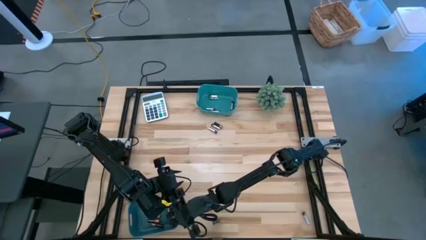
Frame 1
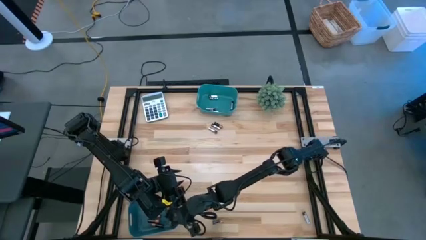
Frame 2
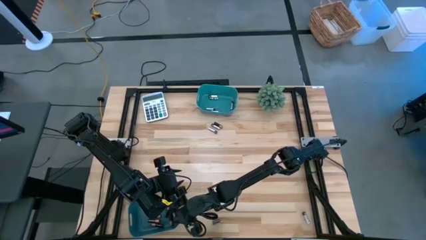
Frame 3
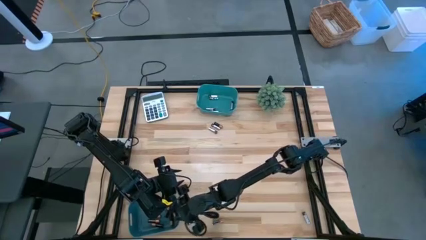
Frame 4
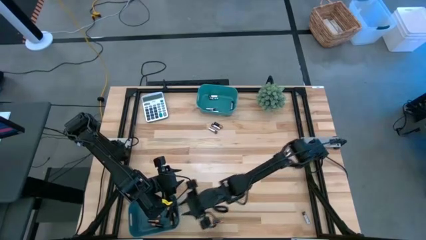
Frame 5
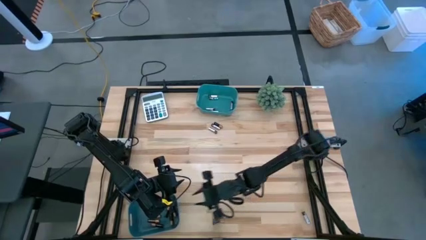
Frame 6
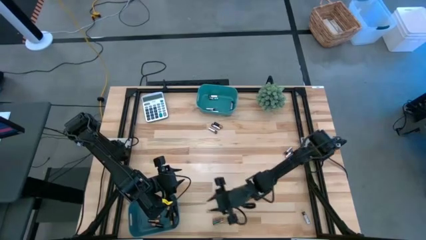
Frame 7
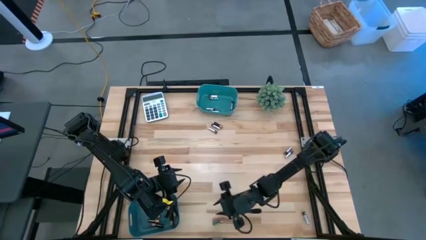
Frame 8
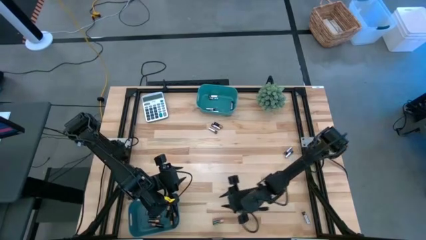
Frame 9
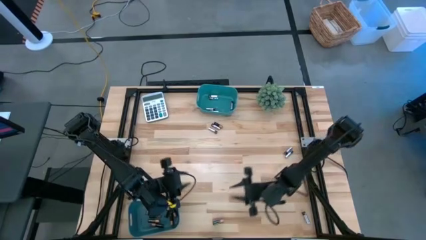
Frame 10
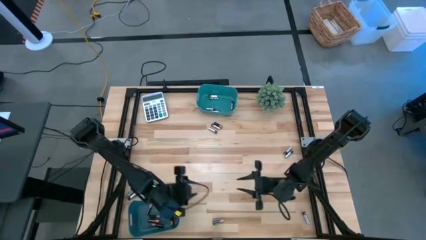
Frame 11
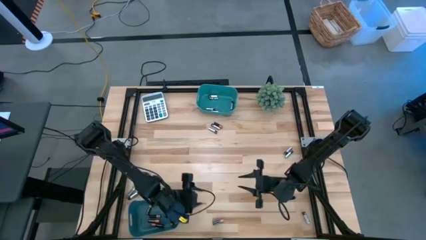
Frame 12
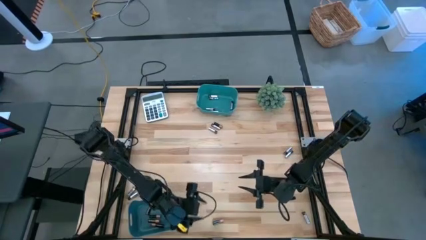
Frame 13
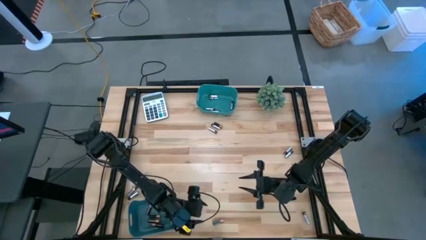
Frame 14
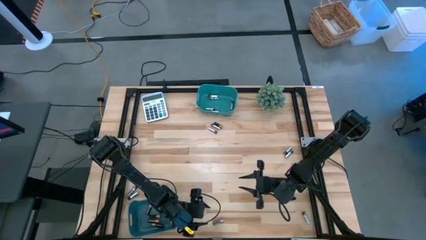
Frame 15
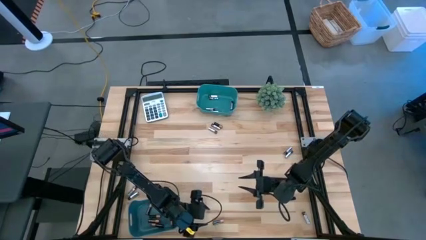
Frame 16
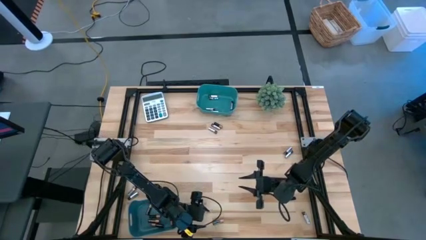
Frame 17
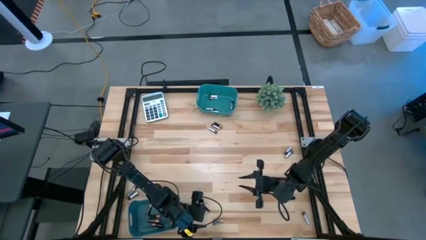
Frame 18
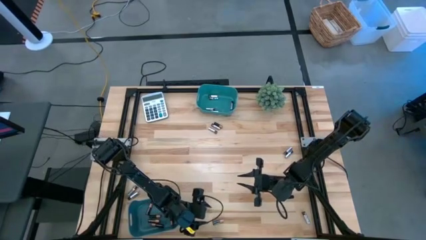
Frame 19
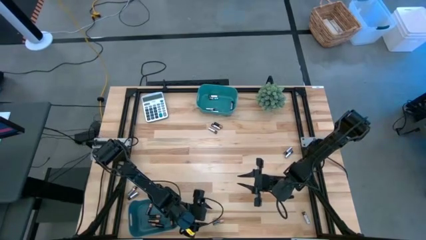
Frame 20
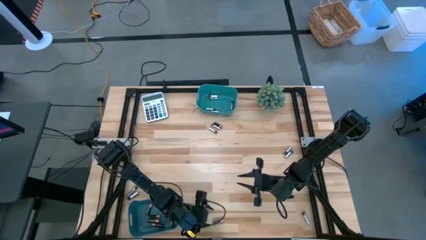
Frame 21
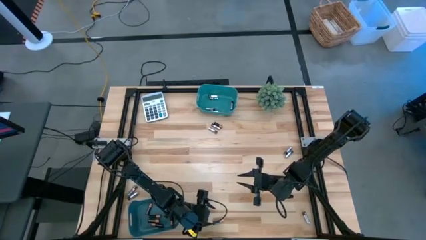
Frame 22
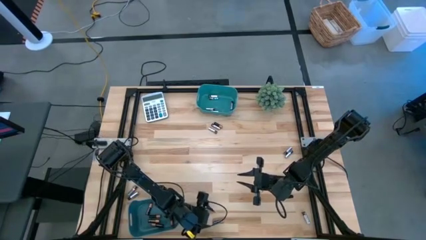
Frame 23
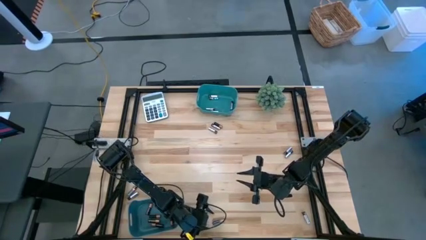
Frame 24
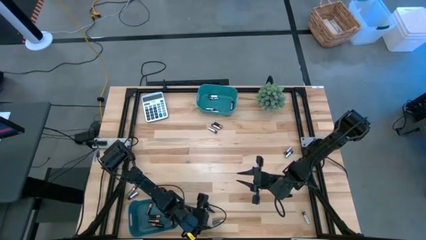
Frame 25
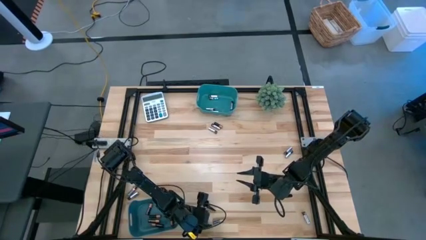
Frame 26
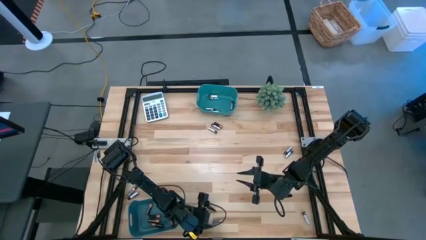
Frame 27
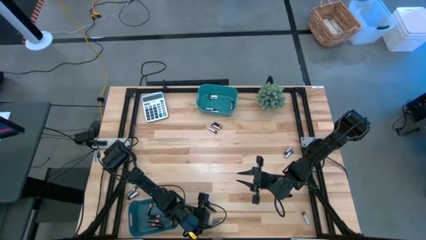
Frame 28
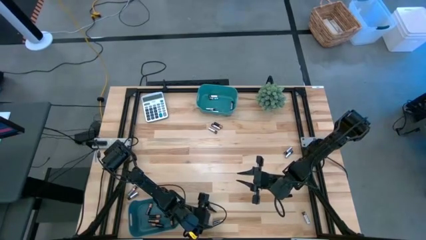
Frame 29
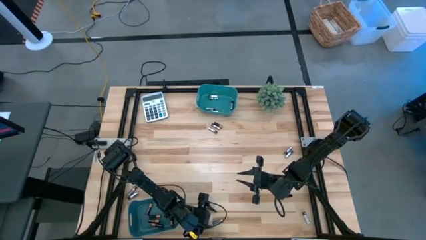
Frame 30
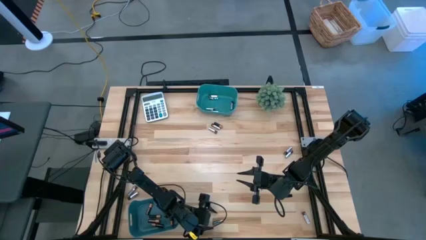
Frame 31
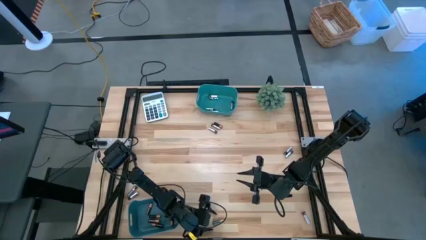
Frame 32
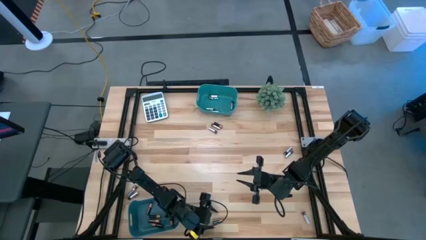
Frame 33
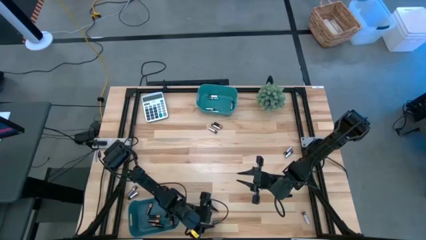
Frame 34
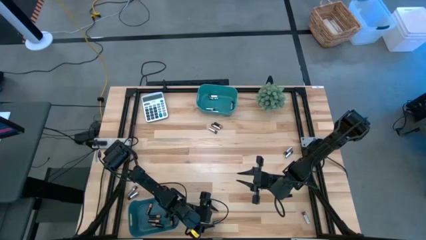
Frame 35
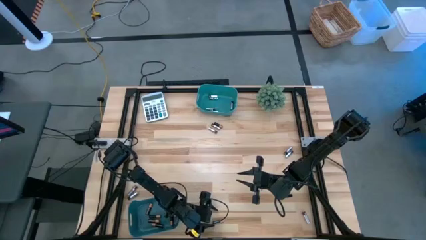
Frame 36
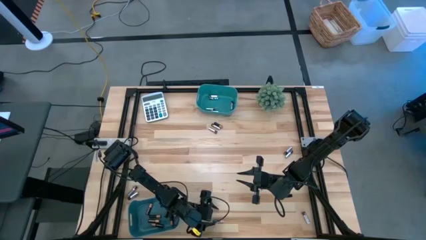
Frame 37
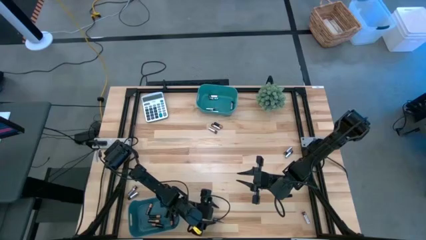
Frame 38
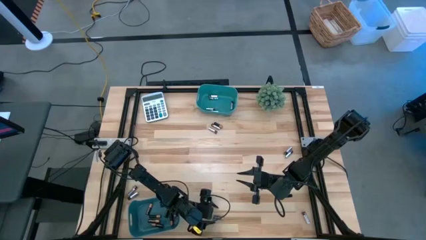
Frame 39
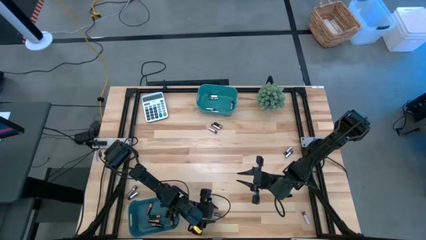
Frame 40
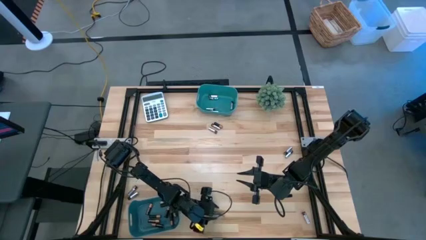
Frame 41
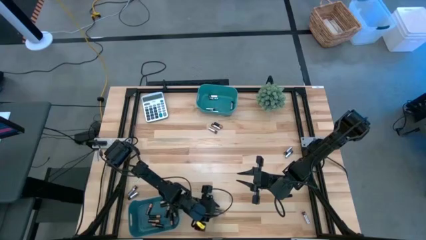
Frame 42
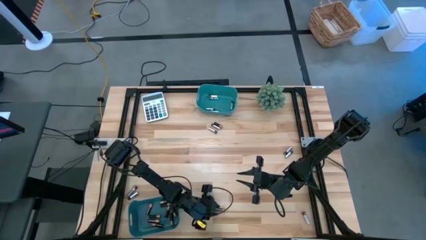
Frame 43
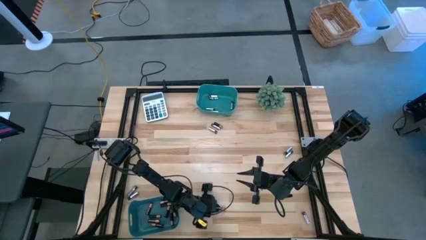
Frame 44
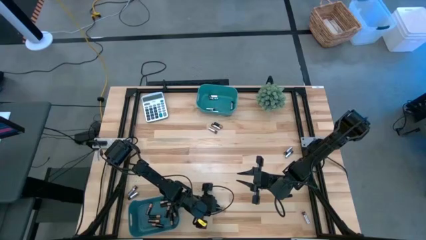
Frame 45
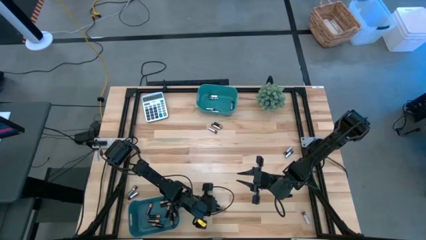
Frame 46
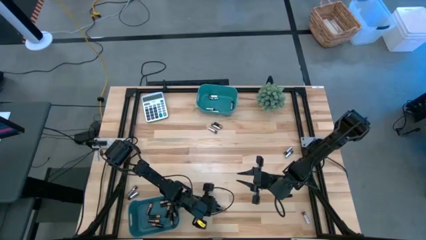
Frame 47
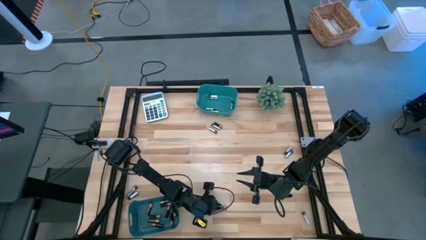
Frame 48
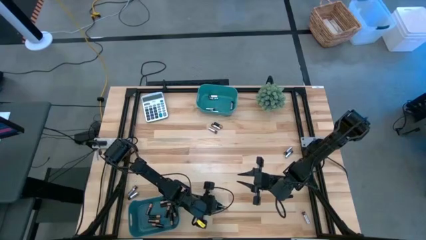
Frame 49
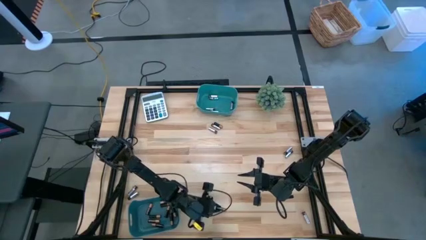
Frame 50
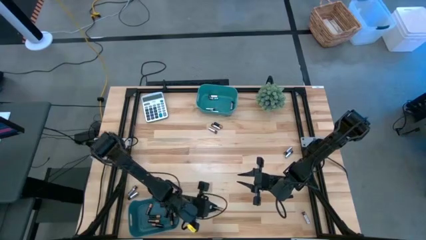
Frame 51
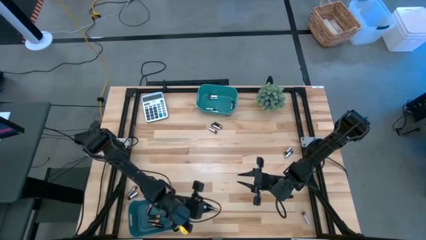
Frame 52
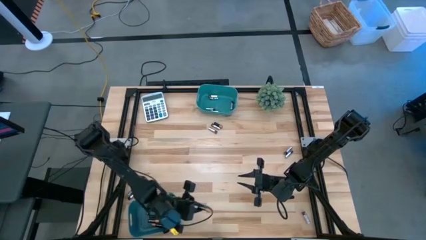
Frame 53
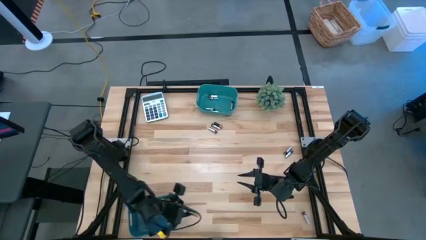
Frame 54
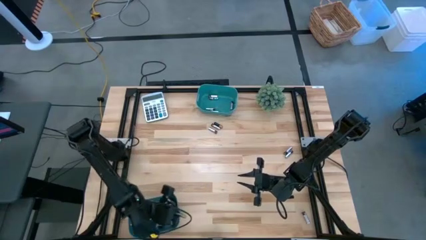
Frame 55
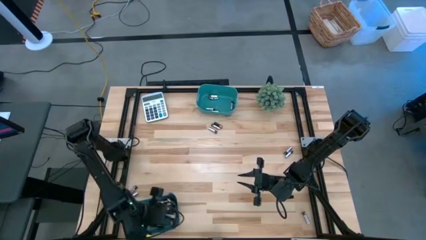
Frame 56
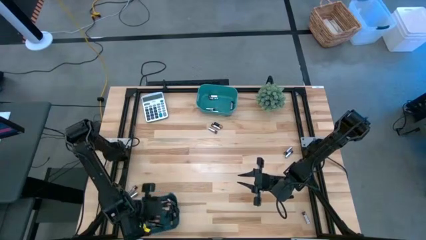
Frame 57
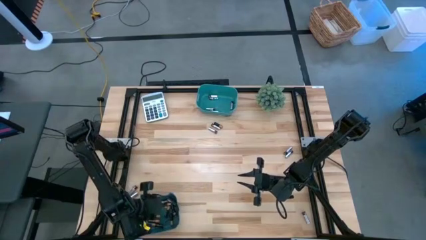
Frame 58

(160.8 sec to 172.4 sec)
Task: Sort batteries
Put the gold battery into the bottom green bin

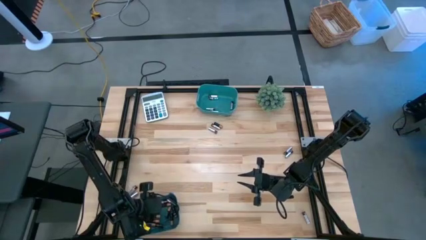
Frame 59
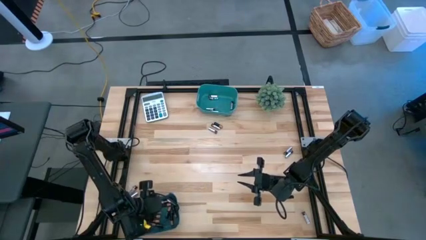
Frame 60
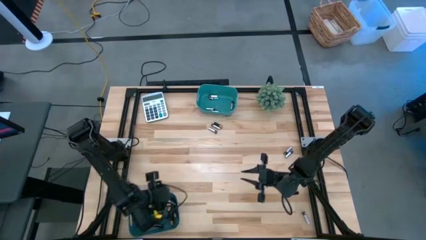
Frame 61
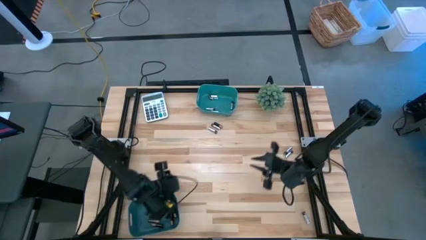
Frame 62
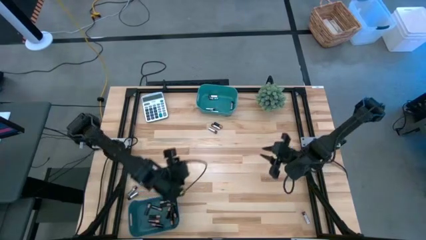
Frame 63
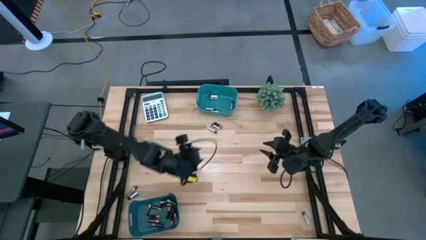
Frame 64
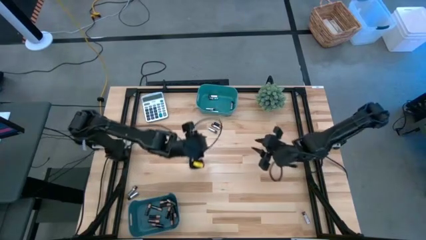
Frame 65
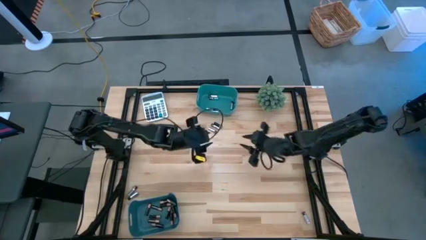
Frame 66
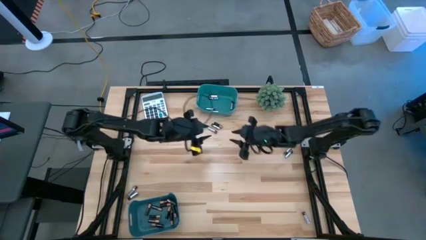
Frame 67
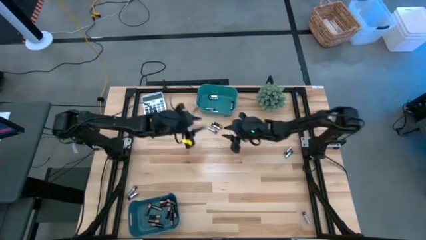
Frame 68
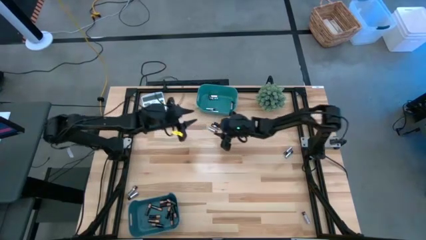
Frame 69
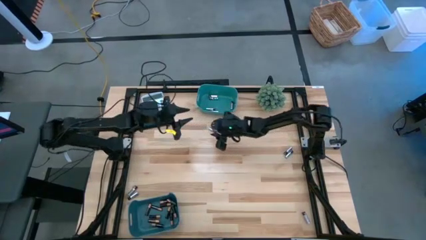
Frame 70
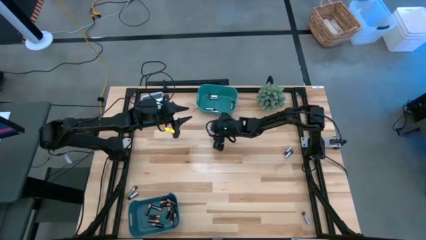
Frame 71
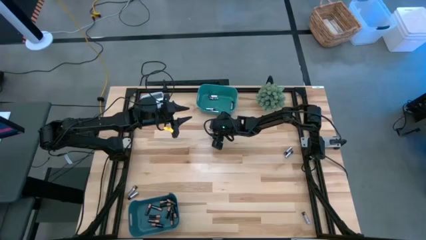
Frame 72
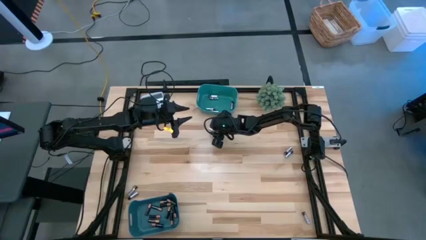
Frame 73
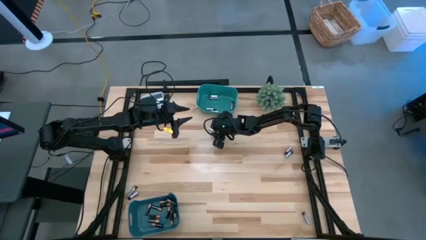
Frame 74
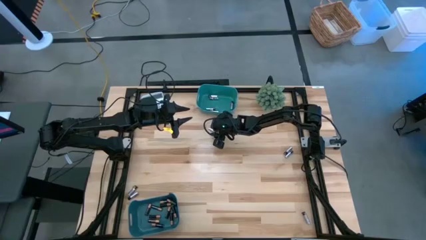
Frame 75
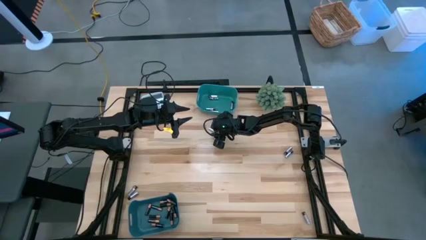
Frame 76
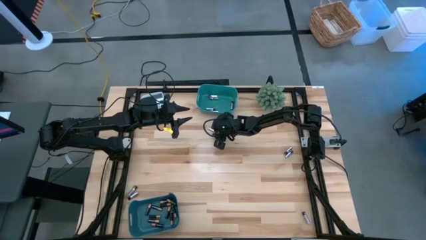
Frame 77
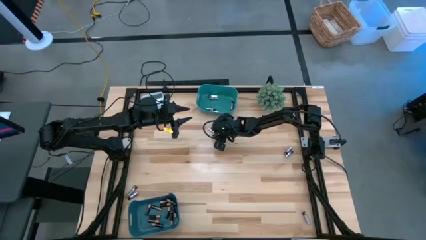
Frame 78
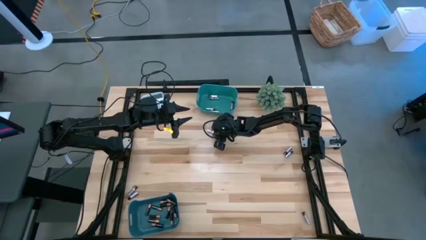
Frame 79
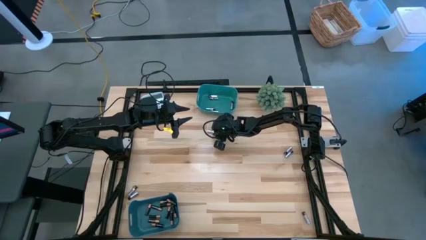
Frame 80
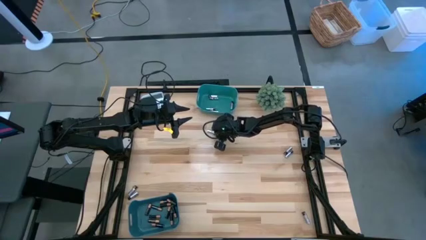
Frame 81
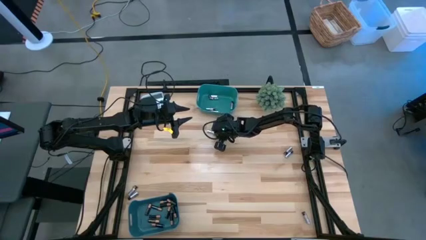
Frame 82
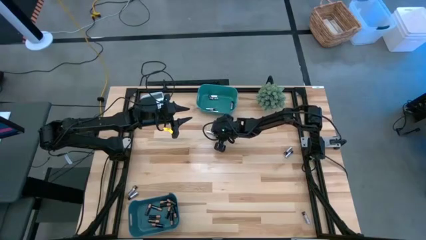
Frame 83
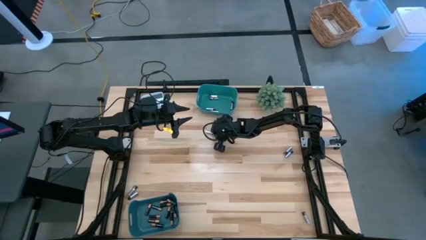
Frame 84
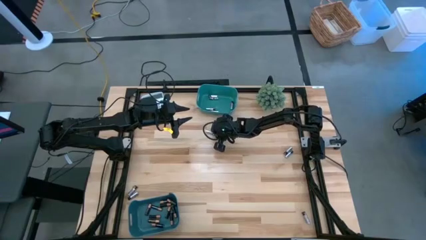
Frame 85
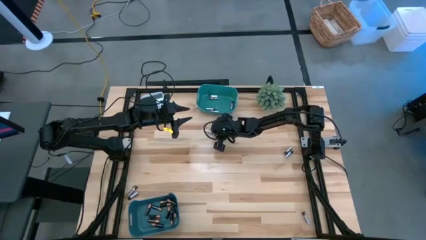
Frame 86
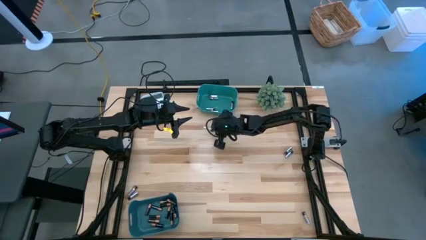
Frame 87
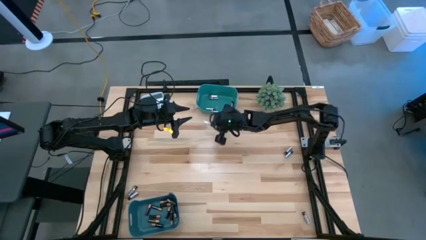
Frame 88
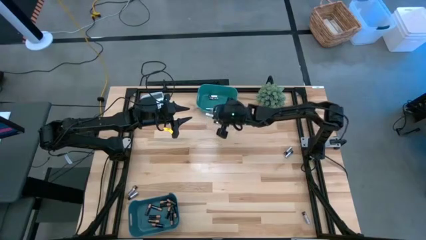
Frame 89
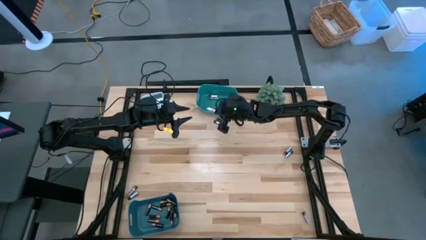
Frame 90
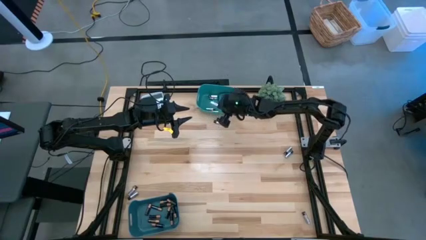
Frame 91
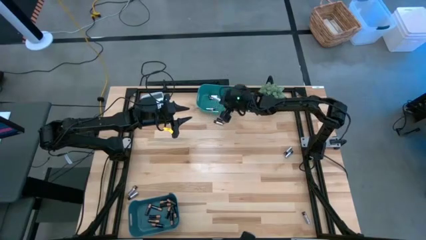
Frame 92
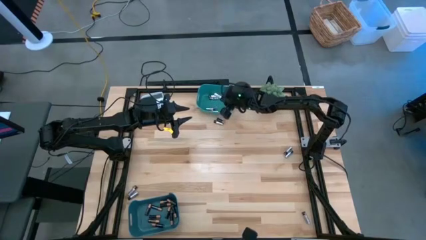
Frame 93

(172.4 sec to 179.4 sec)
Put the silver battery into the top green bin
